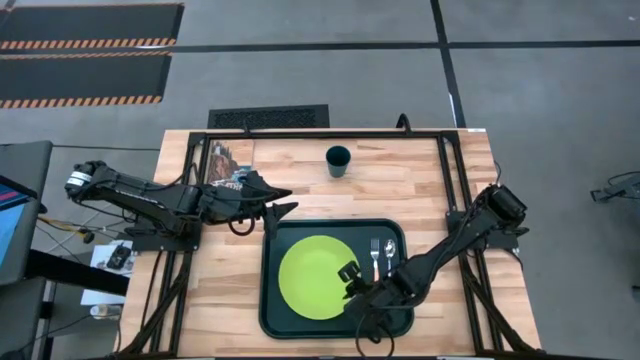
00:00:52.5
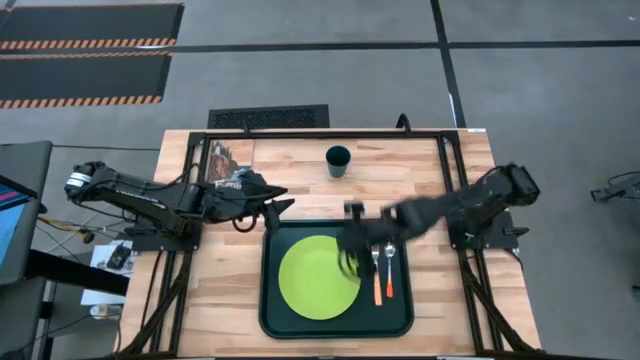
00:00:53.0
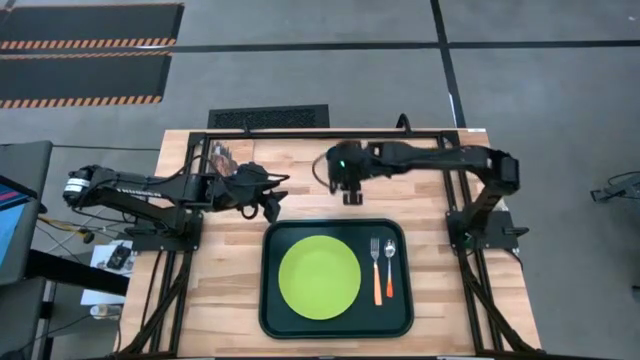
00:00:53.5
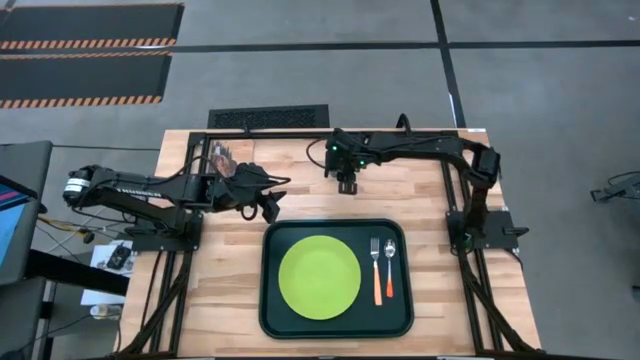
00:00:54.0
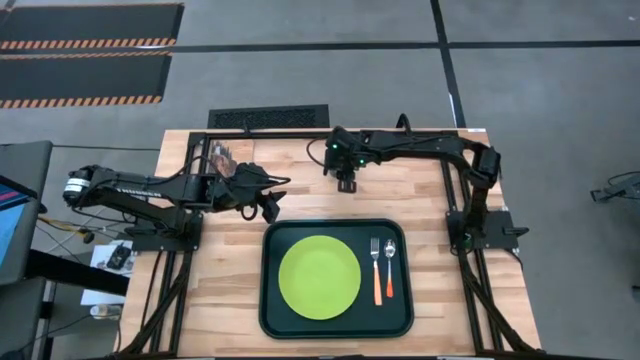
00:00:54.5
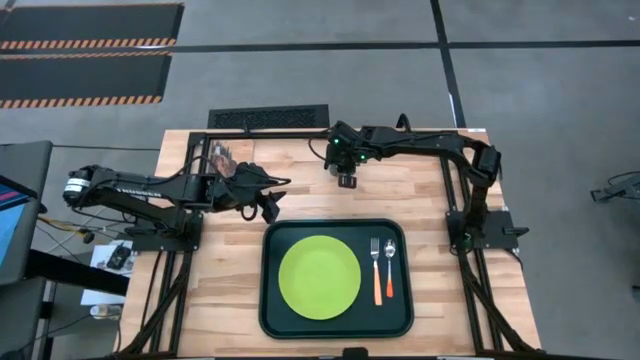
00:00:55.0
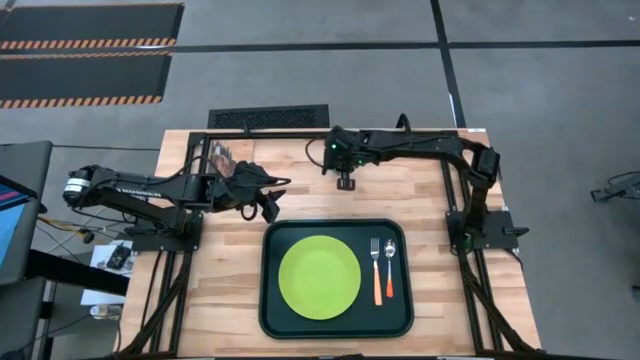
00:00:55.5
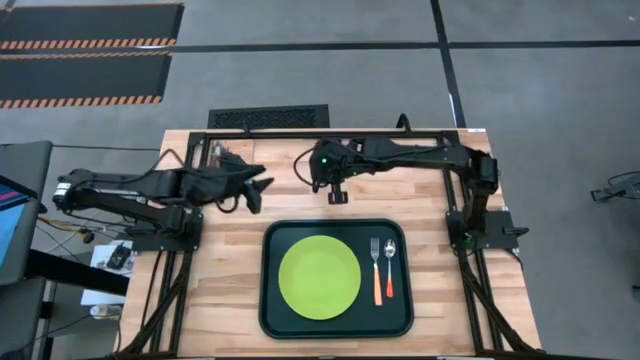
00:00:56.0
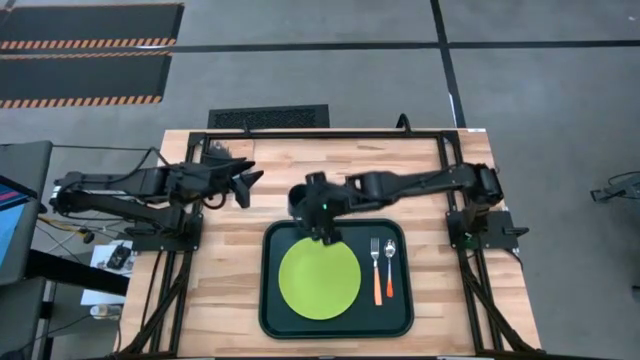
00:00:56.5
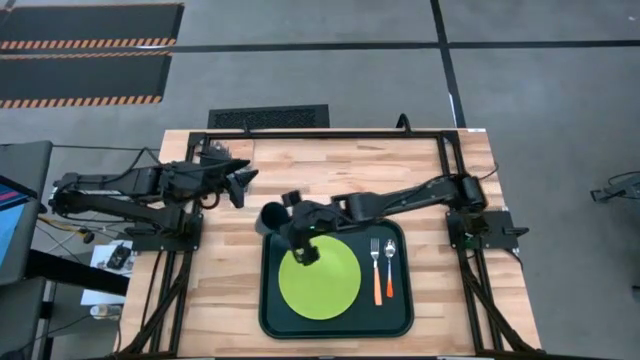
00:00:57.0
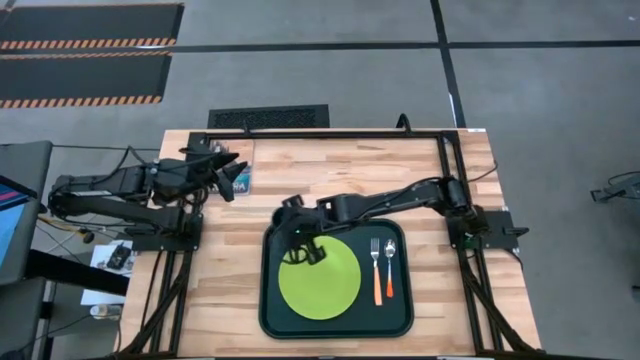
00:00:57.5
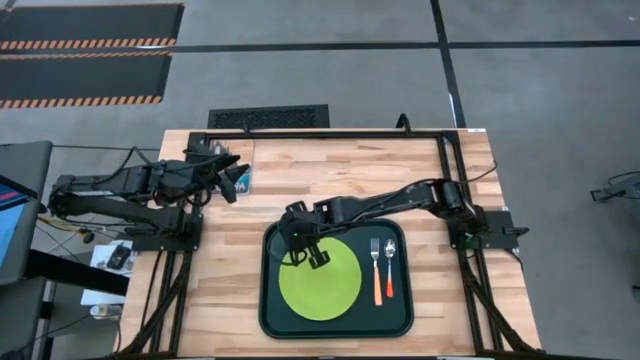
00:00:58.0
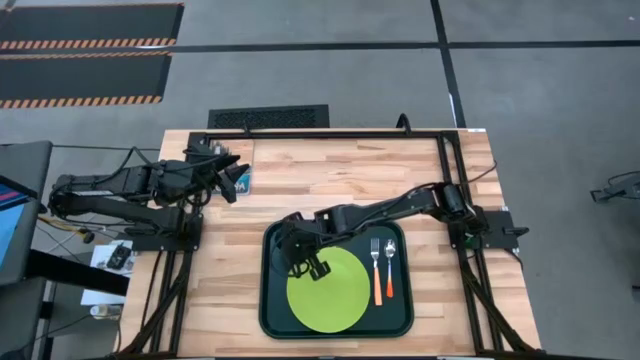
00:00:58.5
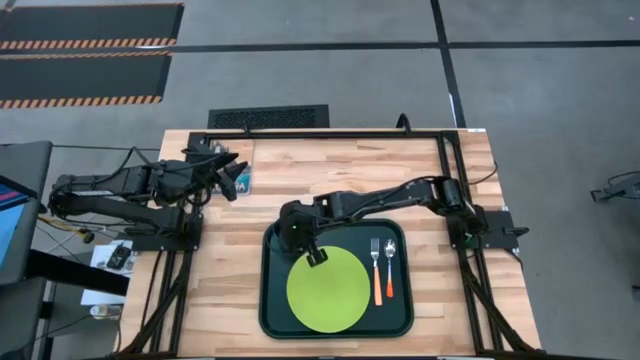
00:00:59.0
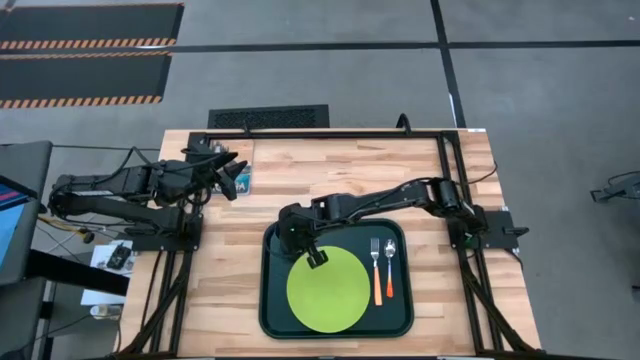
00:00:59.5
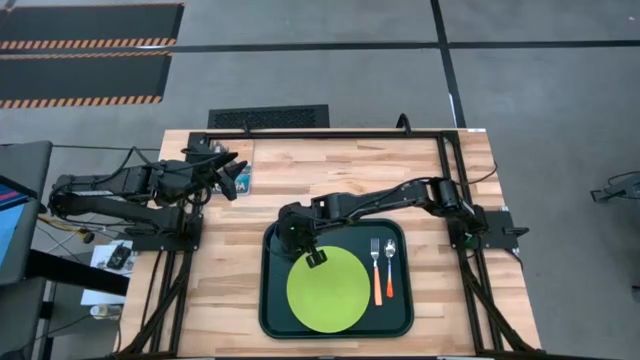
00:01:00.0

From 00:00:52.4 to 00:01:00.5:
Task: Pick and place plate/cup/fork/spoon on tray
Put the blue cup on the black serving tray to the top left of the green plate

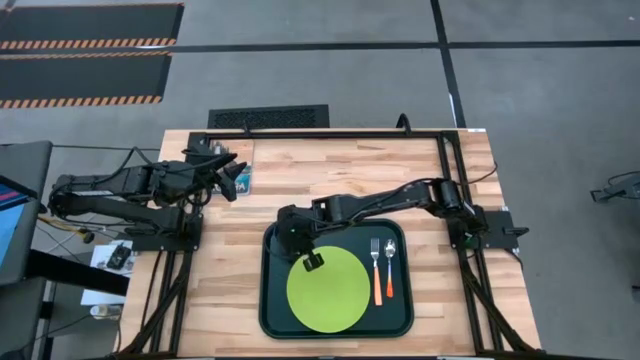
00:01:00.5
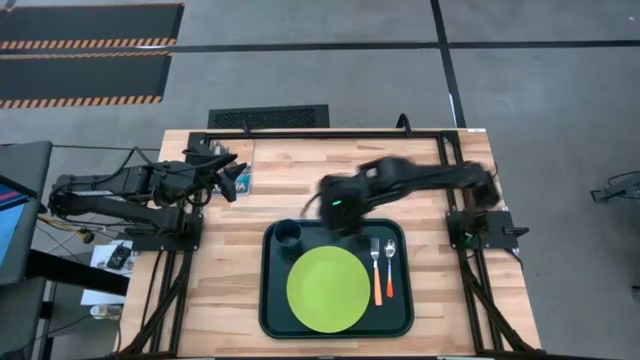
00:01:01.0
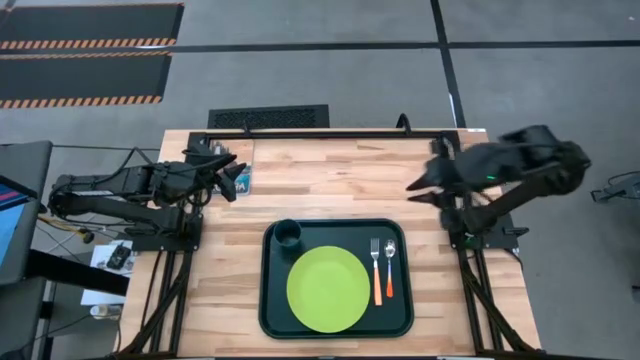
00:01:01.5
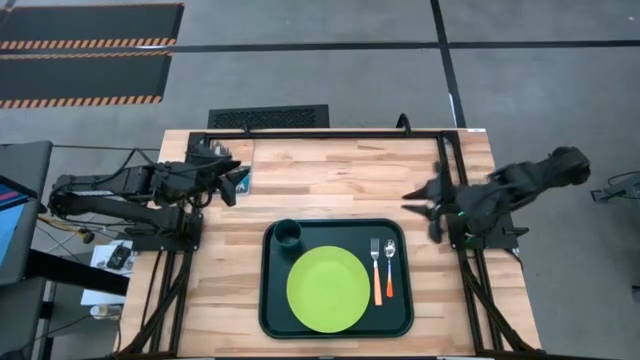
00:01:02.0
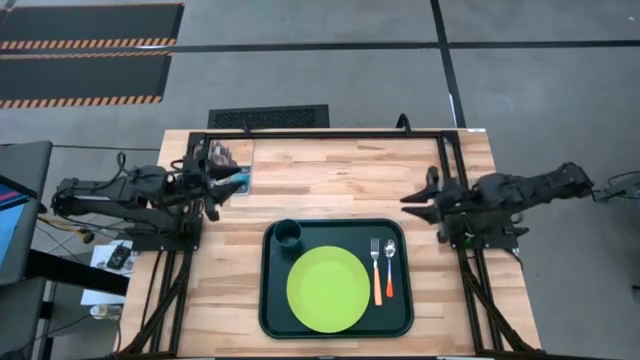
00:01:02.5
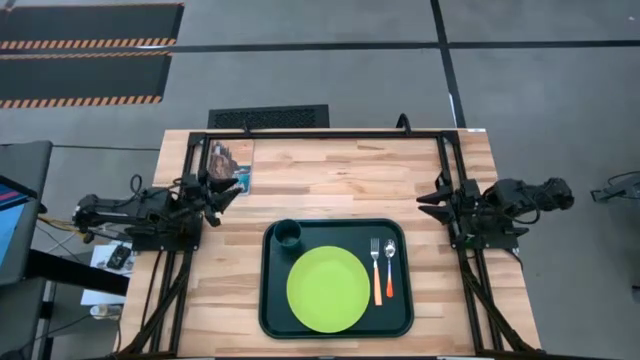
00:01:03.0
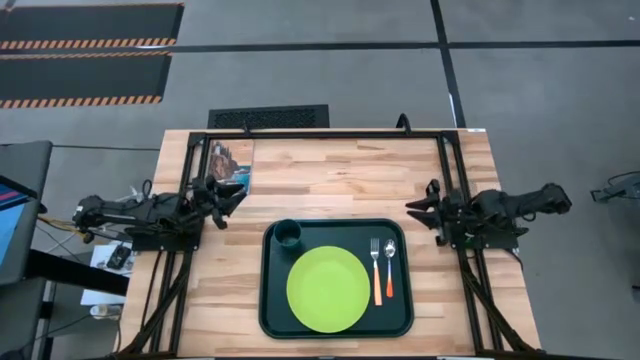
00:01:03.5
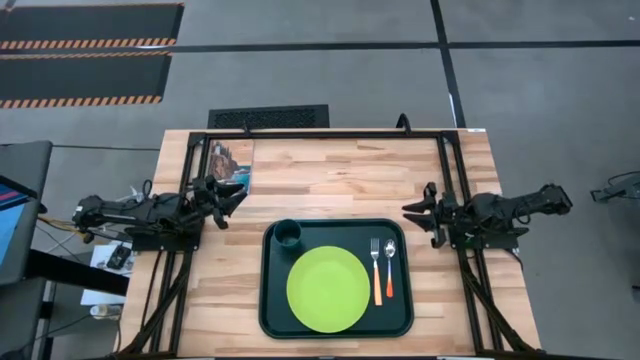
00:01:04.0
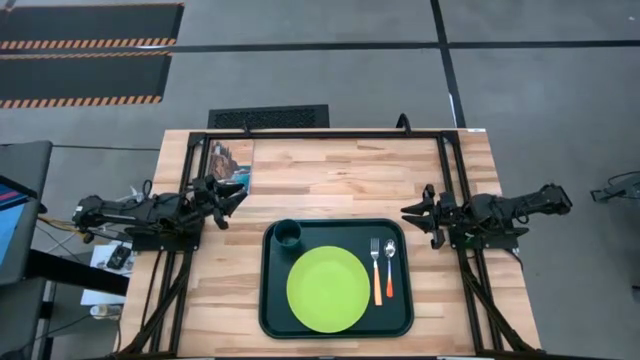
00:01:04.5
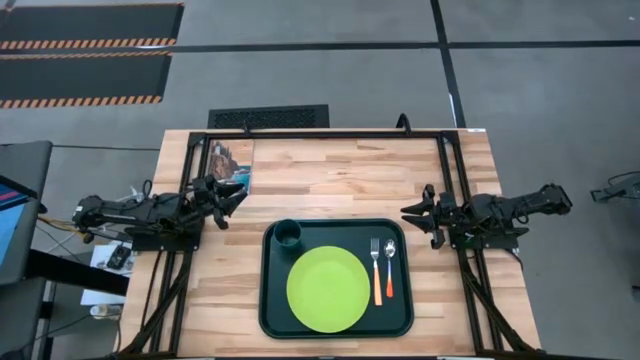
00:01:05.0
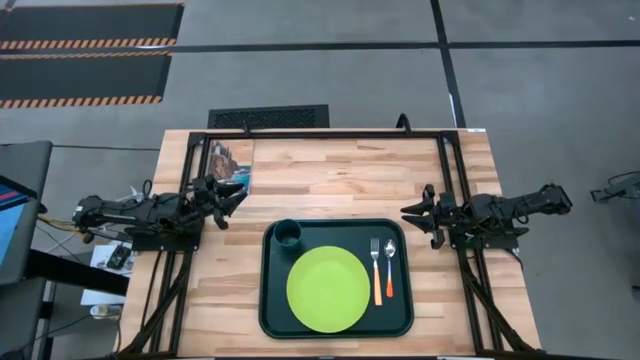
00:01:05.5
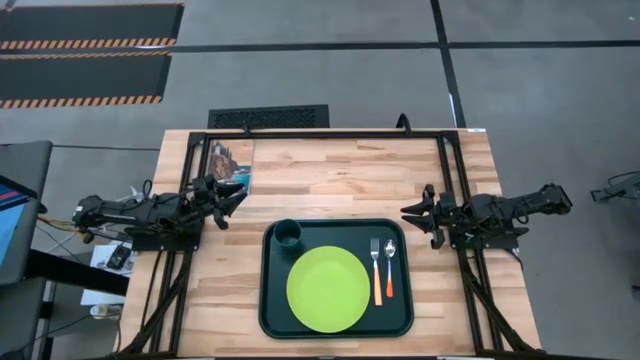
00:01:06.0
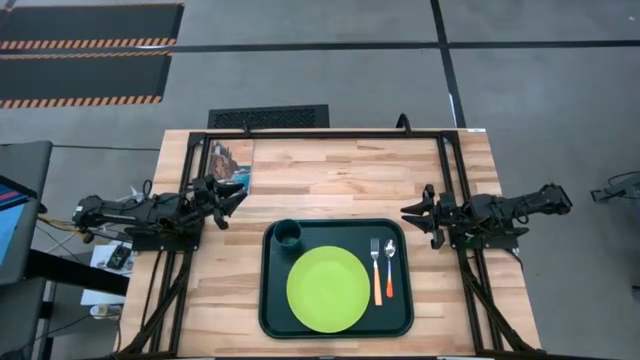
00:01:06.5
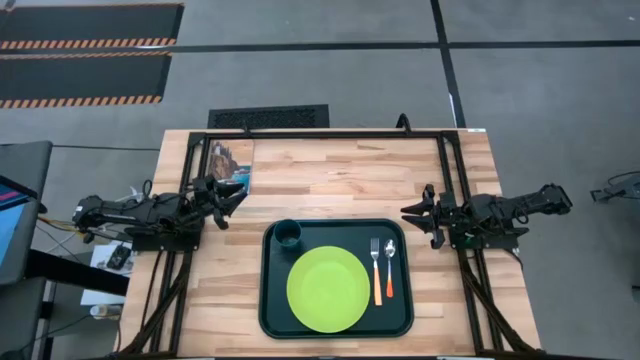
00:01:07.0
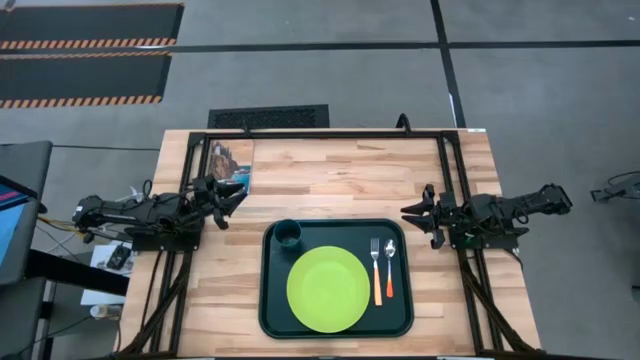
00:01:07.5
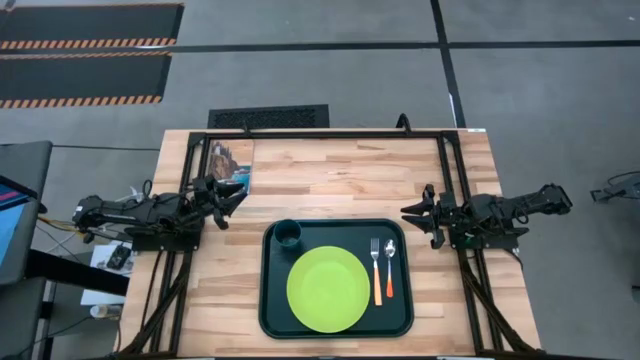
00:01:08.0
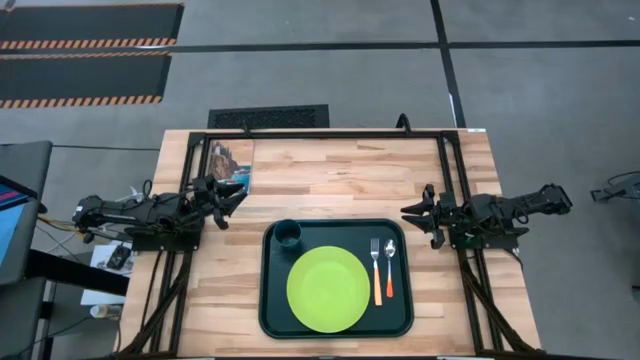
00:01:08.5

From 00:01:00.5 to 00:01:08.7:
Return to Home Position

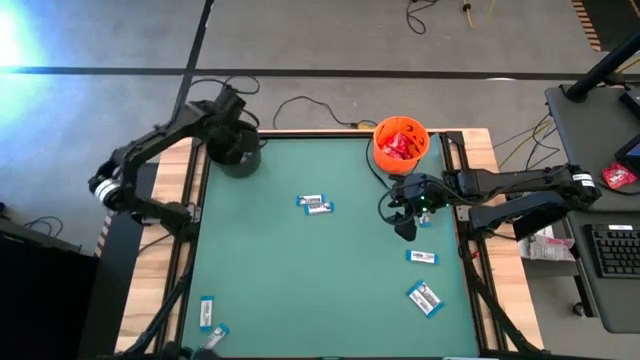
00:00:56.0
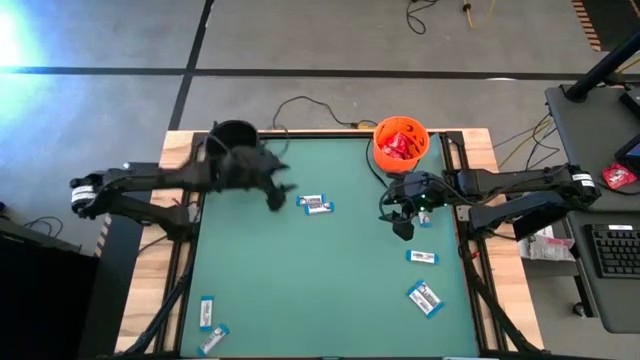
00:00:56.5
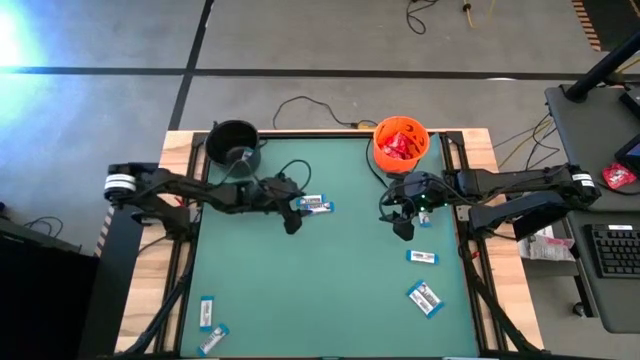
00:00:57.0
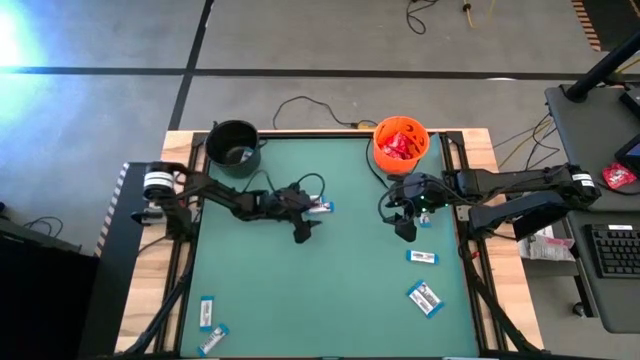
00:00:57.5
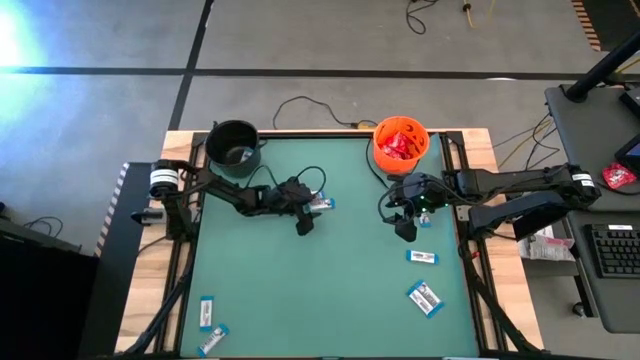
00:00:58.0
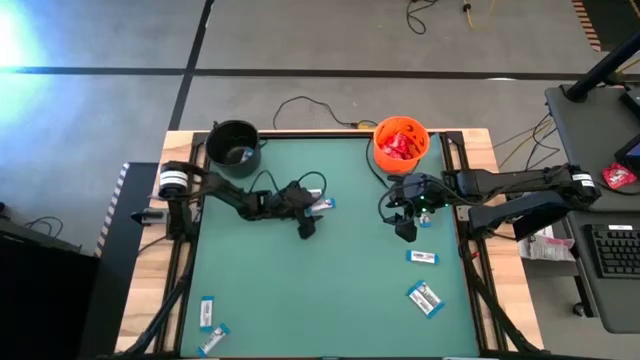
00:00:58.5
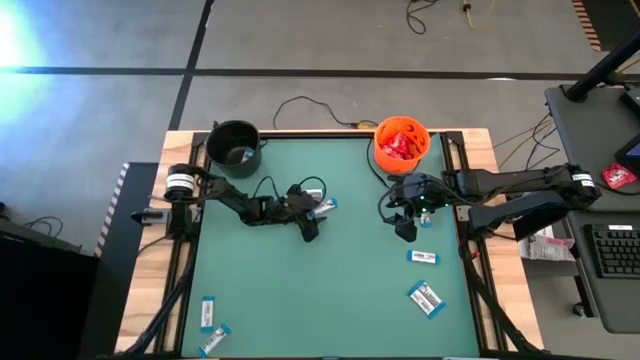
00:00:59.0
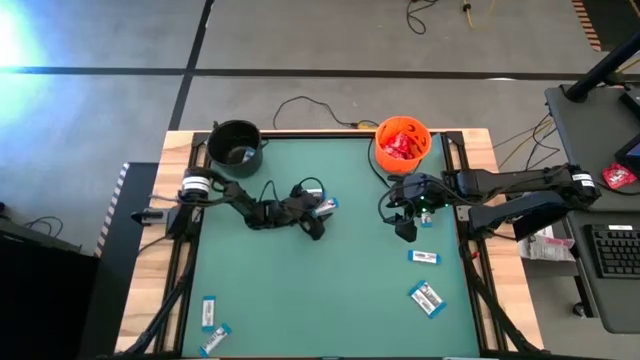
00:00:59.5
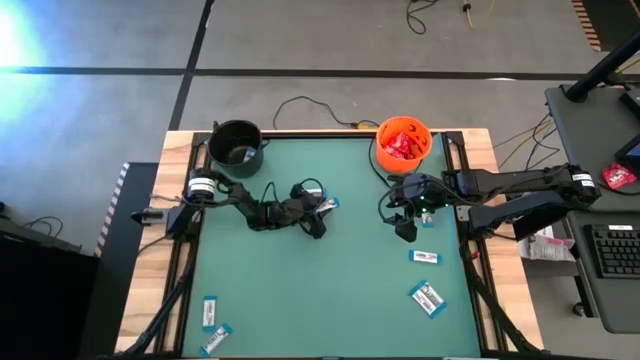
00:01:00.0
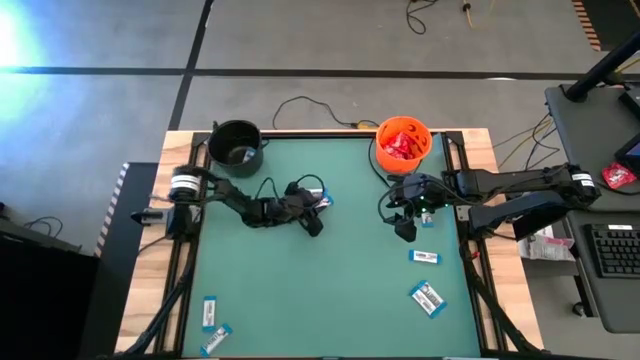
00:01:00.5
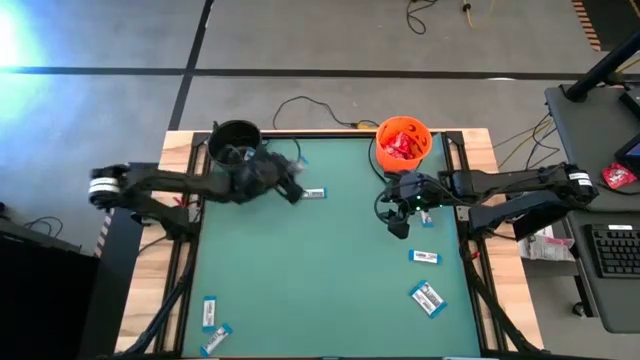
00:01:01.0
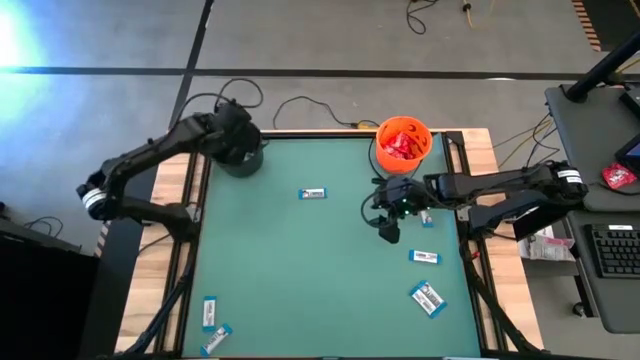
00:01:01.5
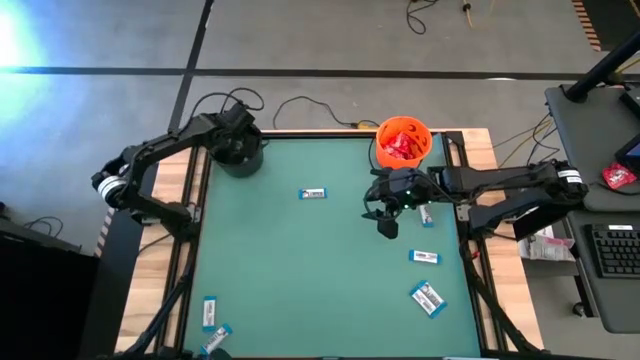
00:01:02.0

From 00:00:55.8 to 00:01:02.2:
Task: Sort candy by brand, put in halloween buckets
Put the white candy into the black bucket
